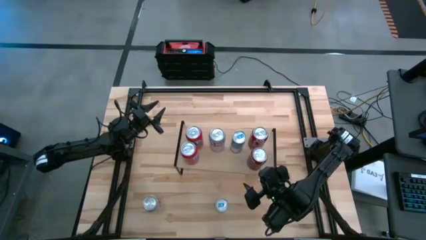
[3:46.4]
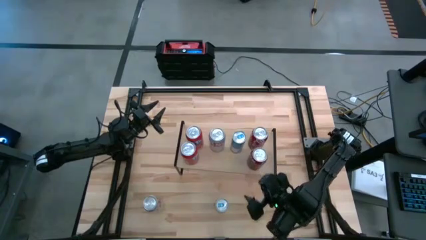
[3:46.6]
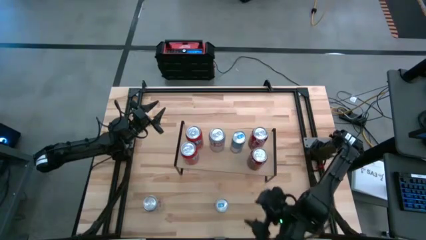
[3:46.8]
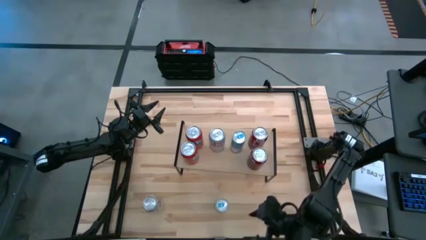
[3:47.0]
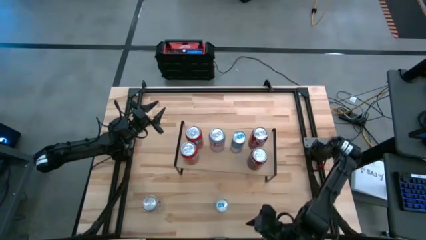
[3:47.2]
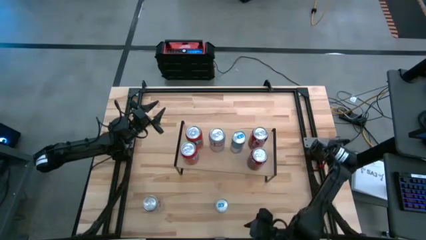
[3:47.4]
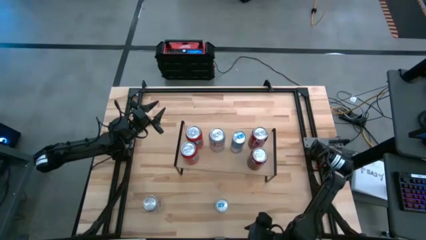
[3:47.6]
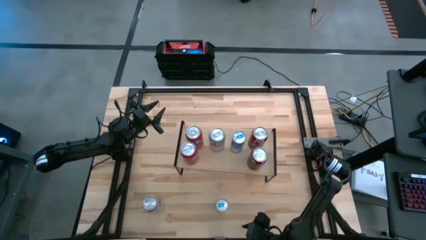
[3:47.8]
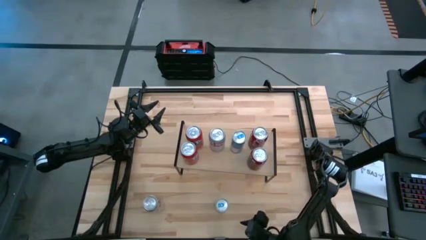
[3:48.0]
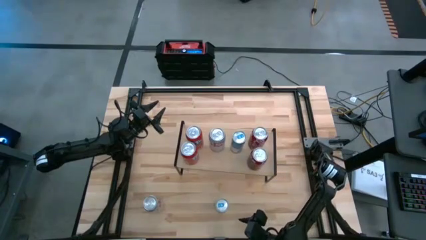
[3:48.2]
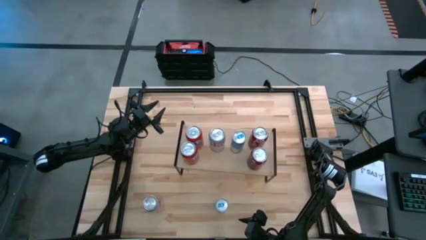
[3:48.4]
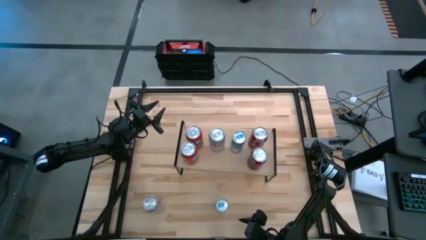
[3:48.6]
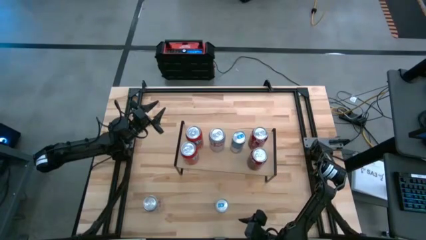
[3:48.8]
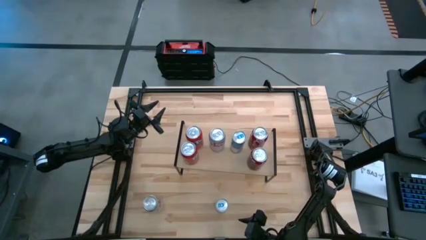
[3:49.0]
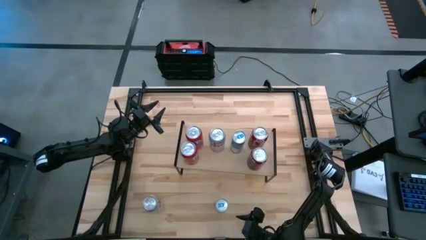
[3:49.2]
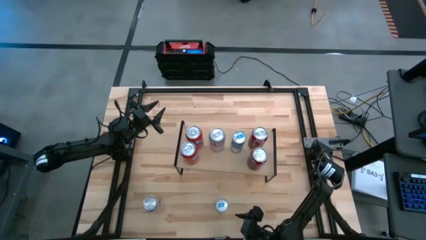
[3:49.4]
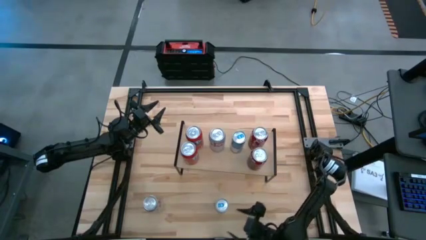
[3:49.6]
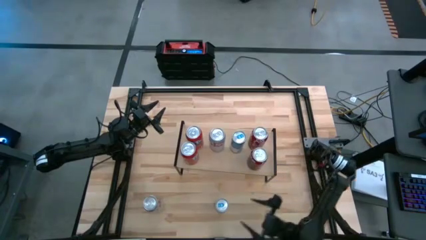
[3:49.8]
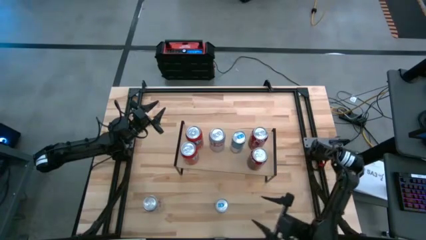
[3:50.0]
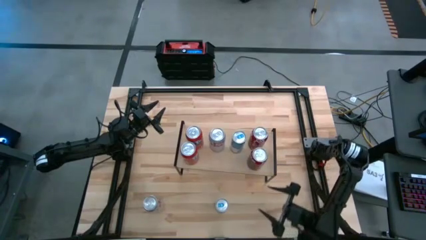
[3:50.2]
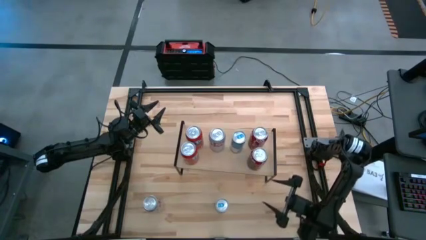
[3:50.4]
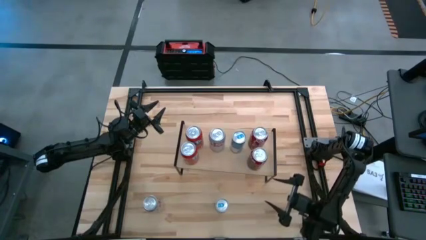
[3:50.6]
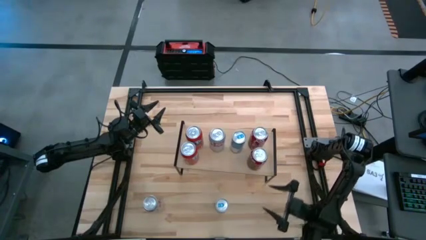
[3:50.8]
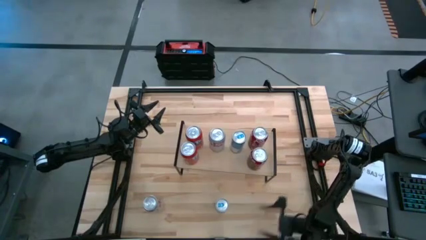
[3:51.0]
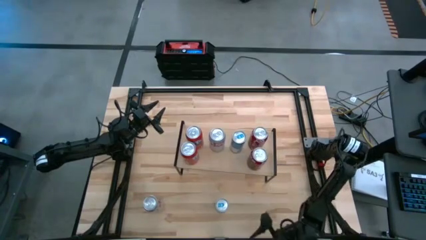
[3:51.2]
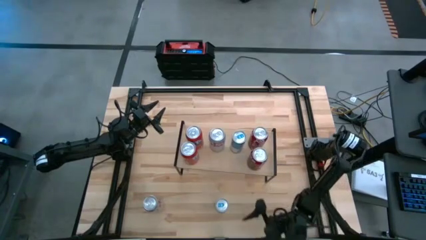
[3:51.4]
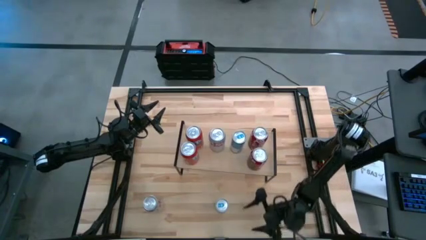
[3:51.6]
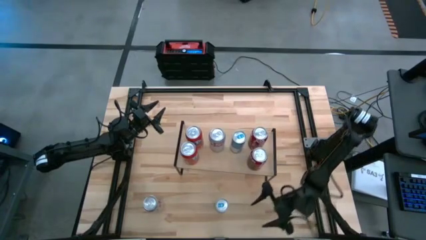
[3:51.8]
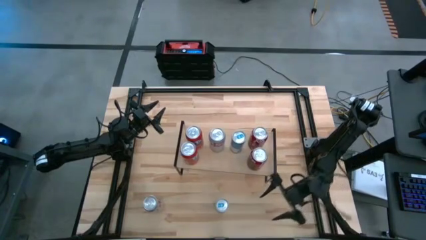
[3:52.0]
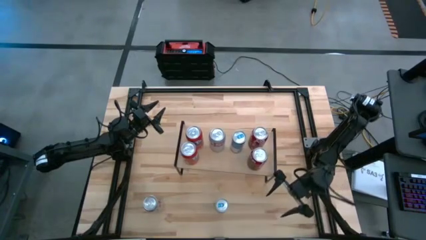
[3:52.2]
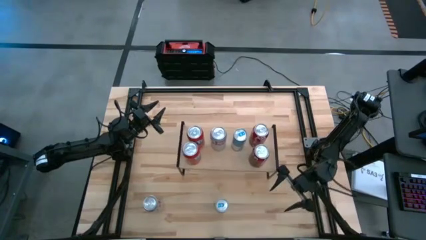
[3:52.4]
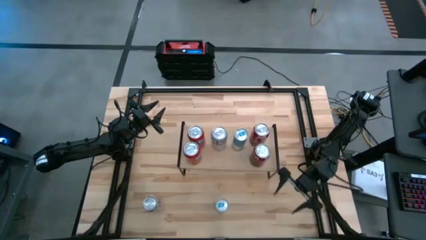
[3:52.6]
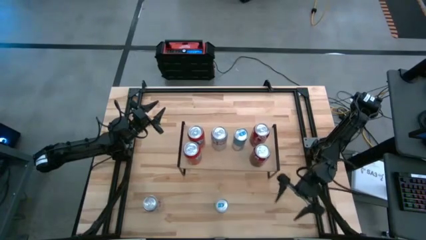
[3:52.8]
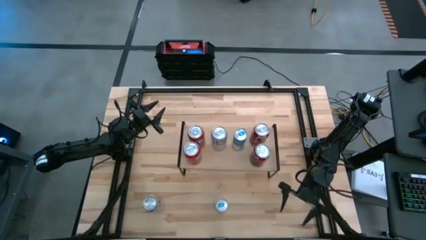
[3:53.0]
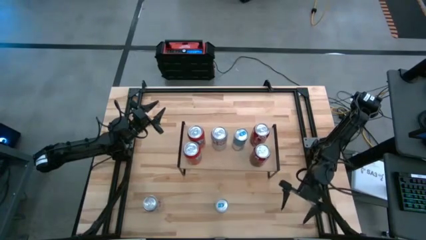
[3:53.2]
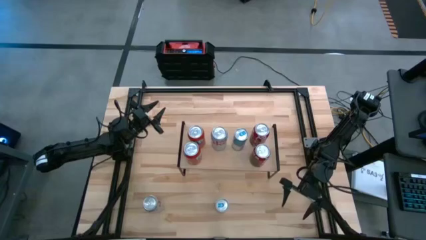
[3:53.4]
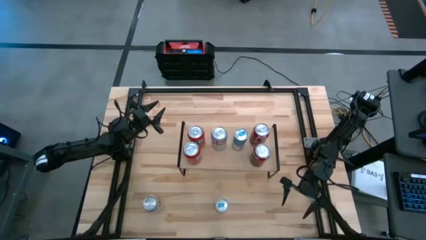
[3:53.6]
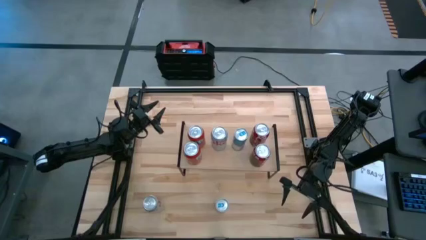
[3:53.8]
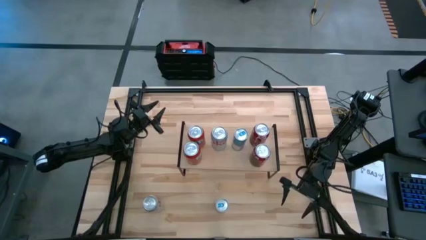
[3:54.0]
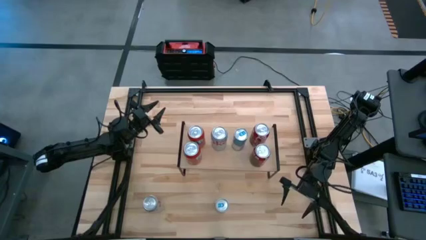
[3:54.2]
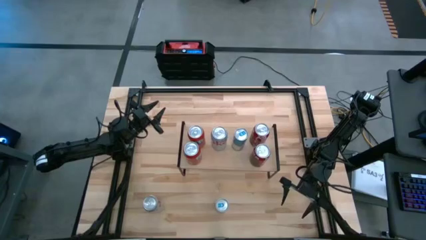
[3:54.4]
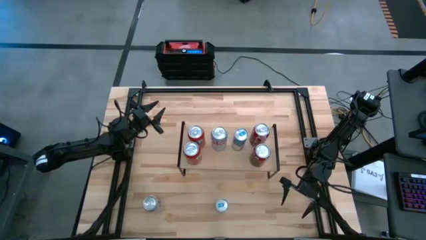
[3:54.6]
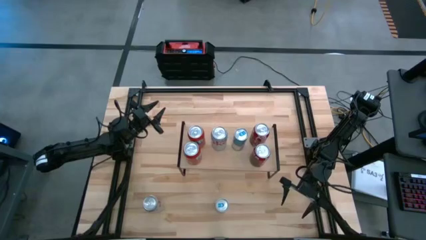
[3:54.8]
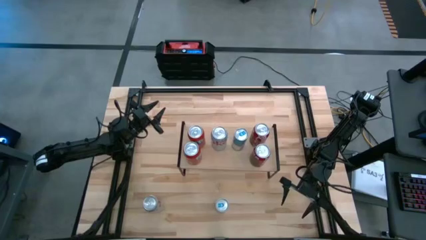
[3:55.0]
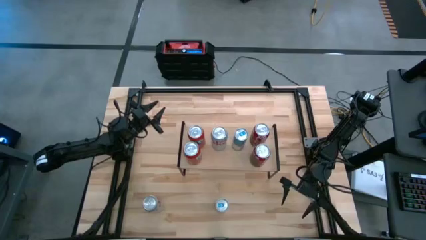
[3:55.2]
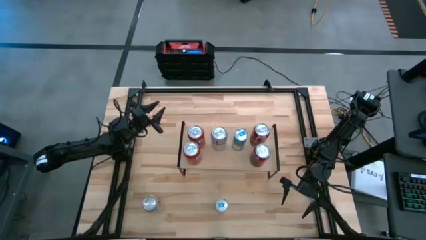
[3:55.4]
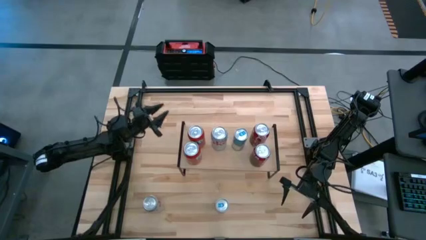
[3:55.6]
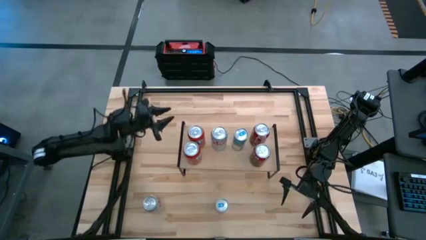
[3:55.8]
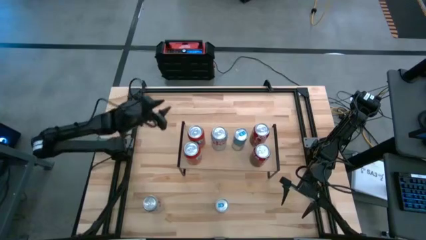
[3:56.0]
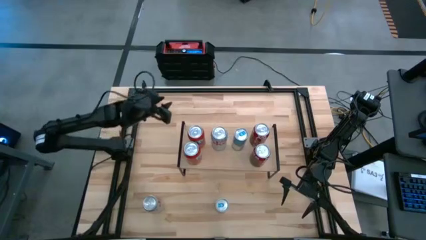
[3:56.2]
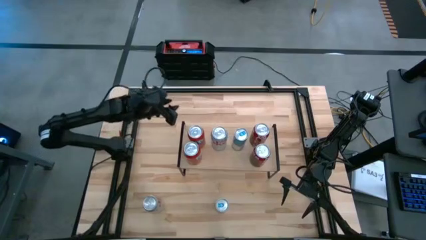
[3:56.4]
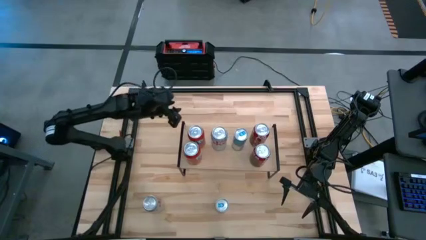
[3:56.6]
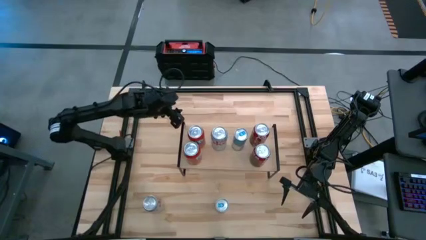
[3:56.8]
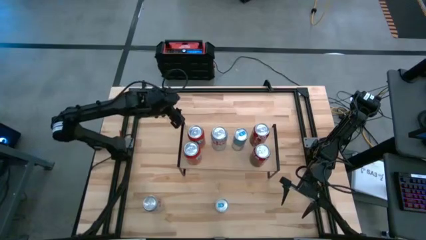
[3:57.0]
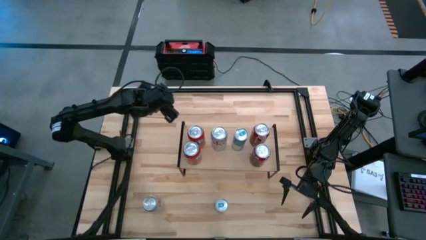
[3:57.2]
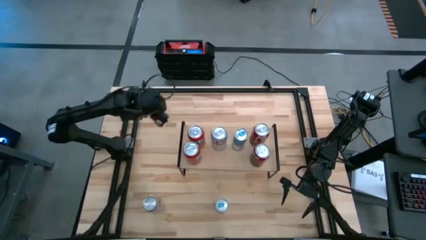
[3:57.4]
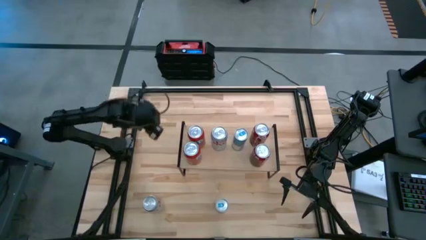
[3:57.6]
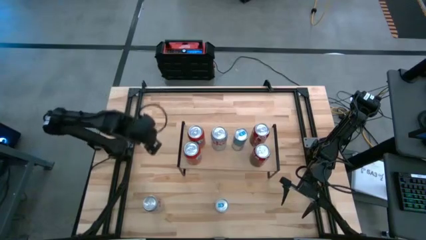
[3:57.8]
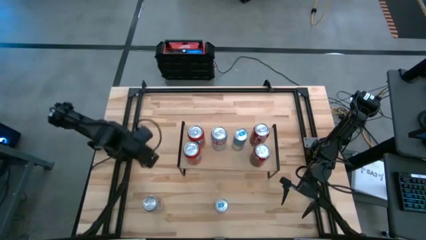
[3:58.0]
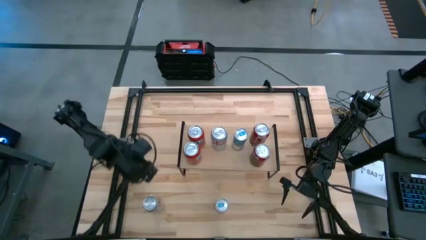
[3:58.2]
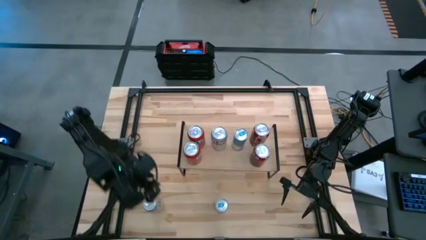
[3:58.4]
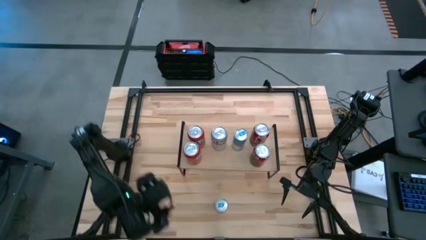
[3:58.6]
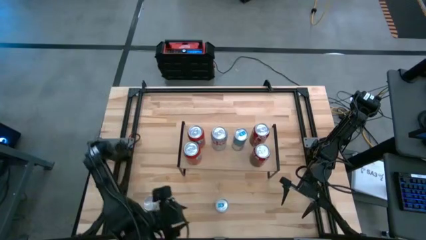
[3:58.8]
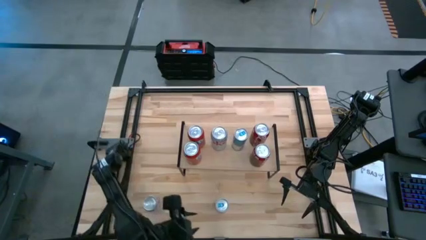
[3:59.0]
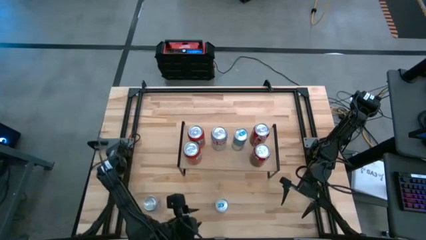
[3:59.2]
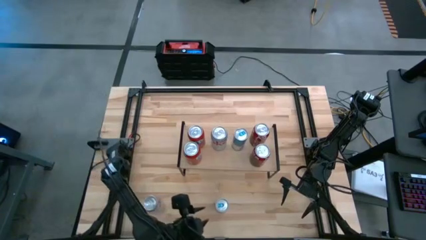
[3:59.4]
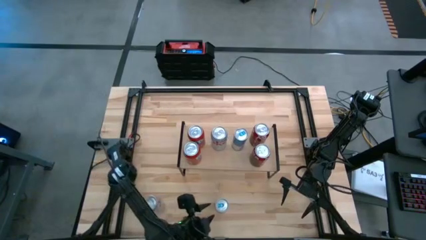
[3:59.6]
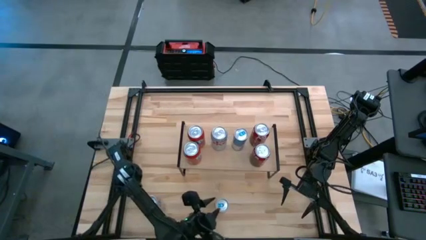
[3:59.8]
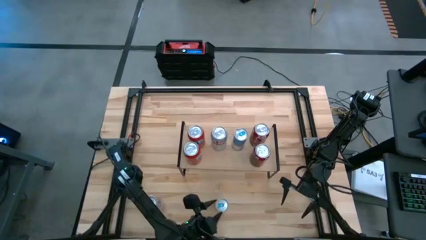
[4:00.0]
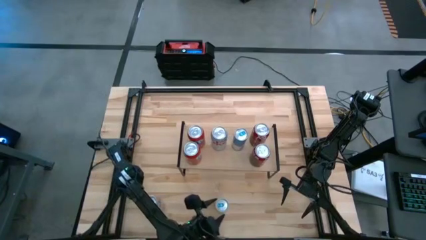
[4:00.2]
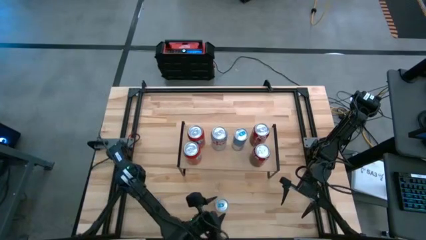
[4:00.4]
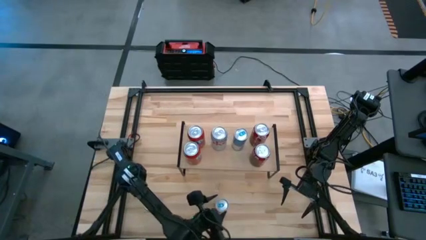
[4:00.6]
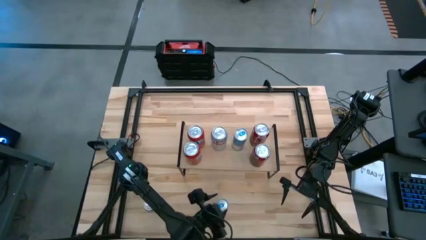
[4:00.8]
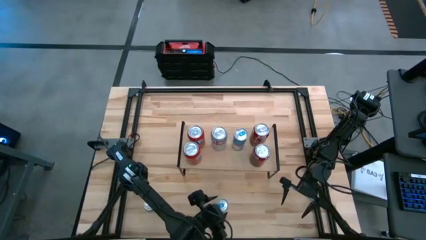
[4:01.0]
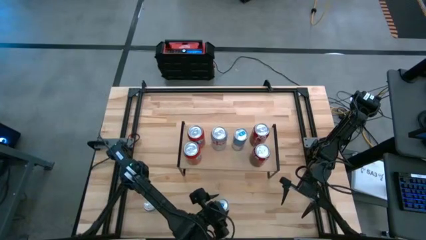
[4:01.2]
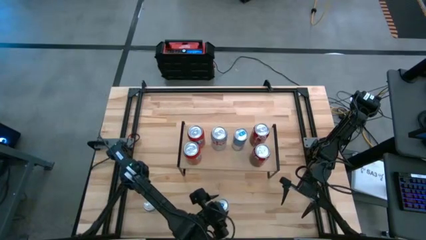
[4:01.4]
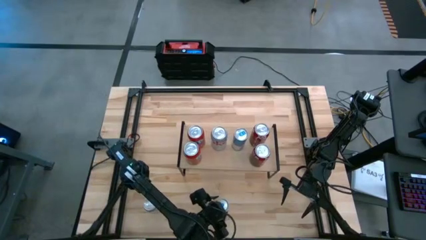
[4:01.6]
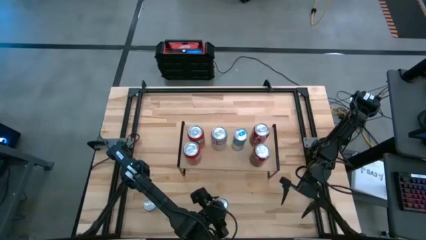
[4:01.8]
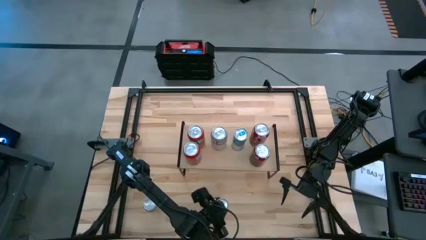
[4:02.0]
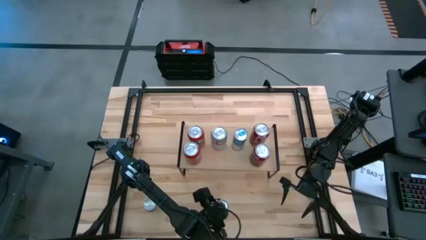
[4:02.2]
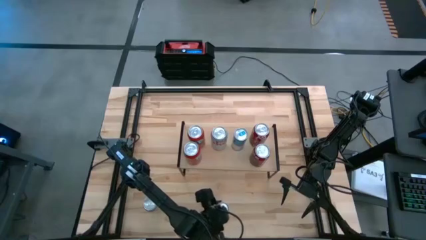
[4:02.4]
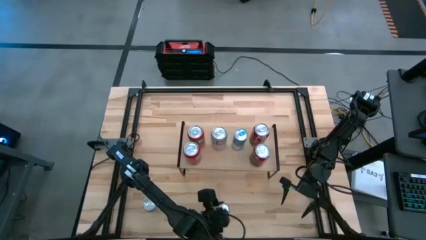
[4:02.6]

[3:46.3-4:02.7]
Task: Place canned beverage on shelf
Put the blue soda can on the shelf
